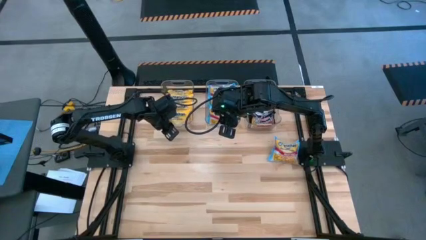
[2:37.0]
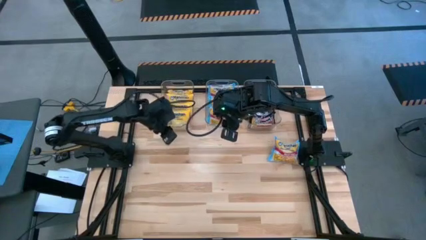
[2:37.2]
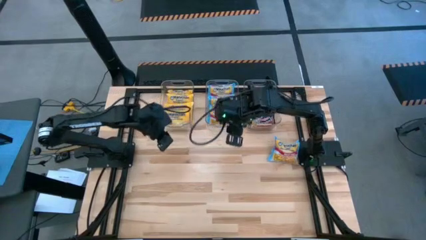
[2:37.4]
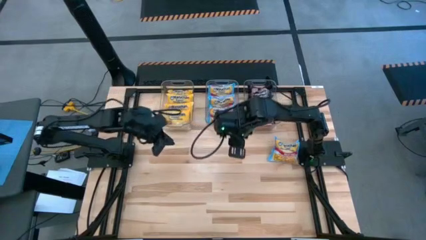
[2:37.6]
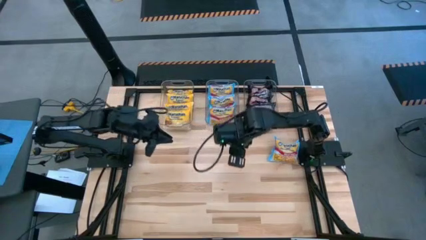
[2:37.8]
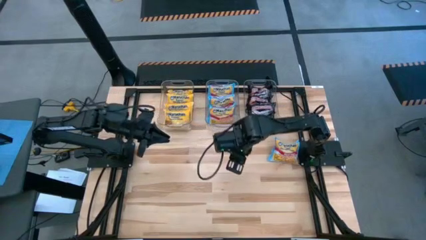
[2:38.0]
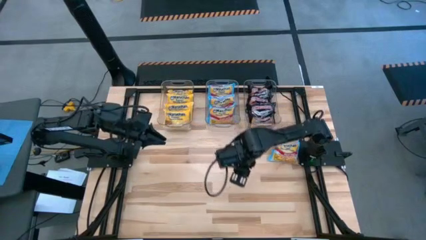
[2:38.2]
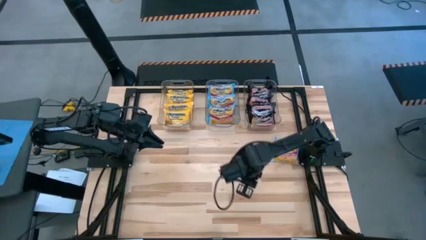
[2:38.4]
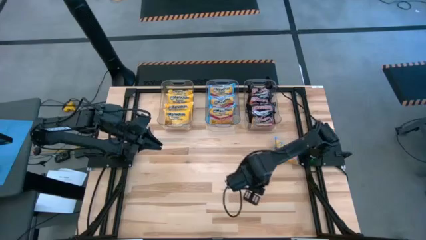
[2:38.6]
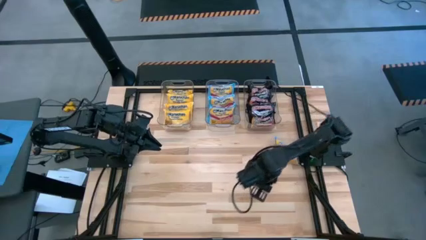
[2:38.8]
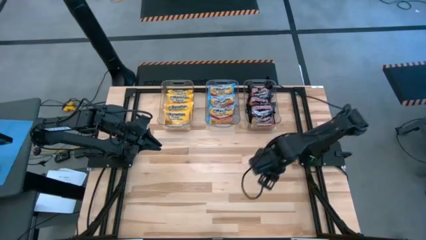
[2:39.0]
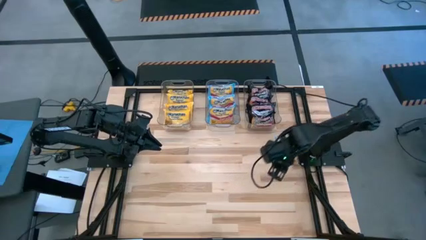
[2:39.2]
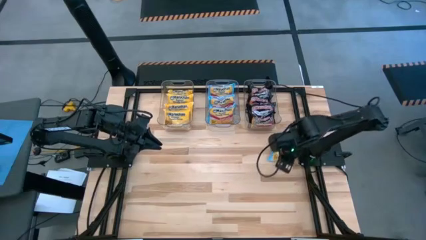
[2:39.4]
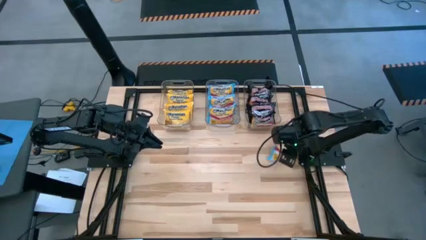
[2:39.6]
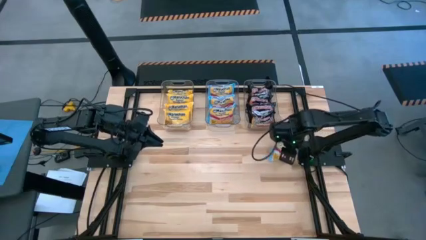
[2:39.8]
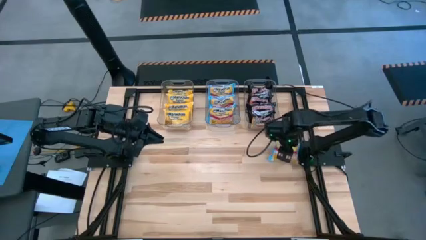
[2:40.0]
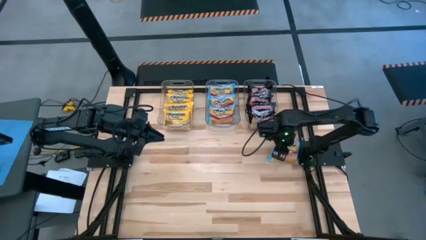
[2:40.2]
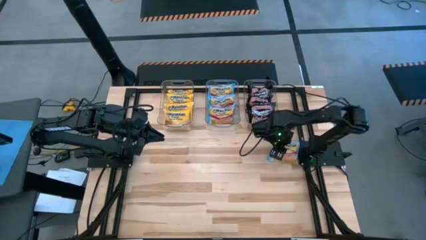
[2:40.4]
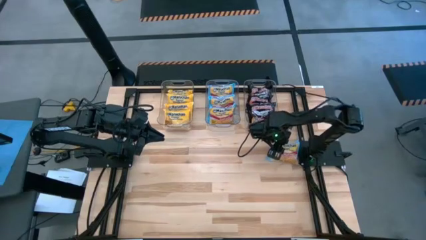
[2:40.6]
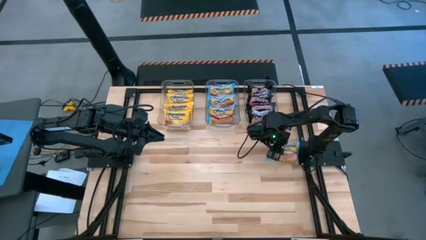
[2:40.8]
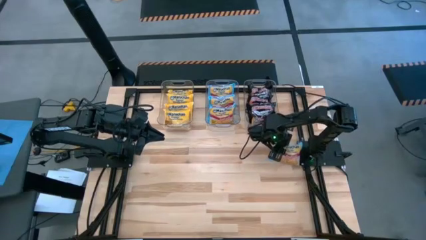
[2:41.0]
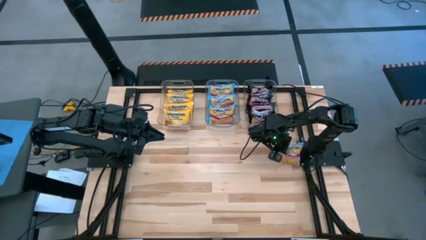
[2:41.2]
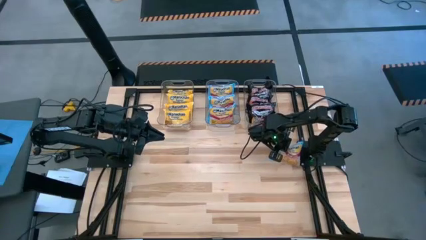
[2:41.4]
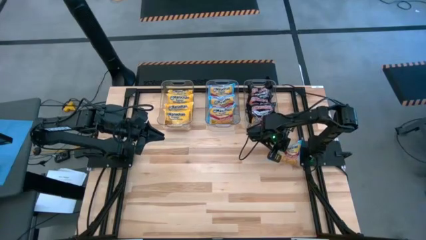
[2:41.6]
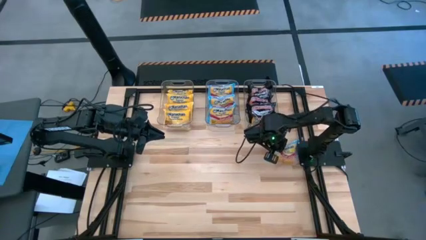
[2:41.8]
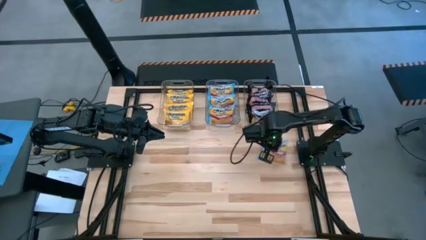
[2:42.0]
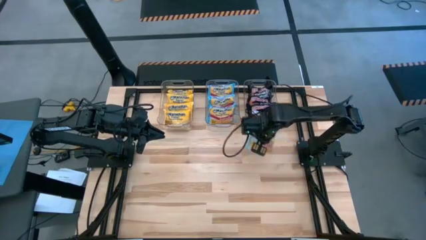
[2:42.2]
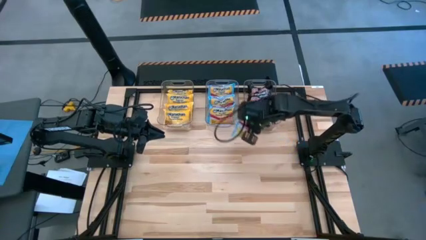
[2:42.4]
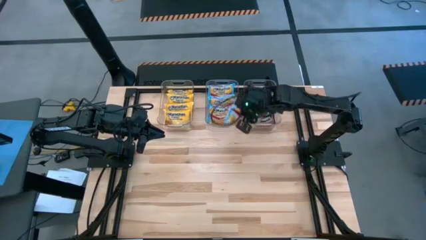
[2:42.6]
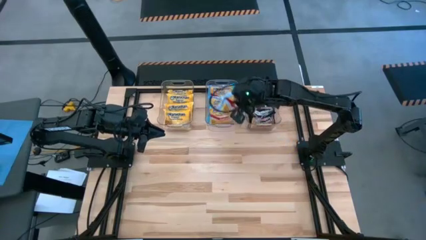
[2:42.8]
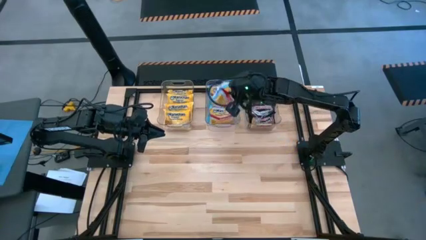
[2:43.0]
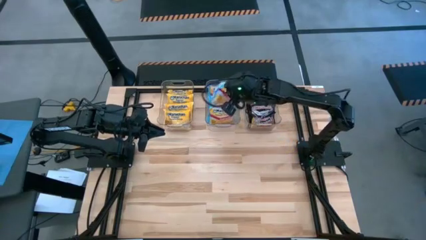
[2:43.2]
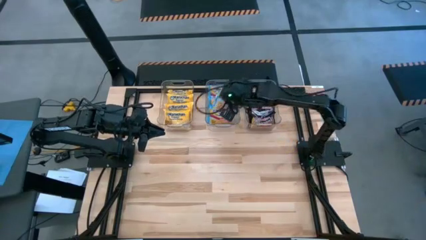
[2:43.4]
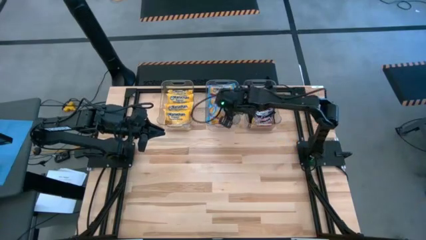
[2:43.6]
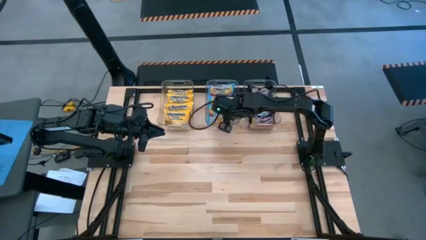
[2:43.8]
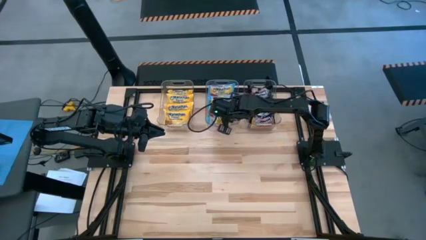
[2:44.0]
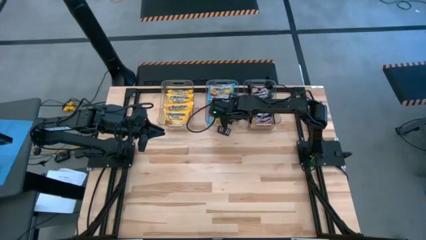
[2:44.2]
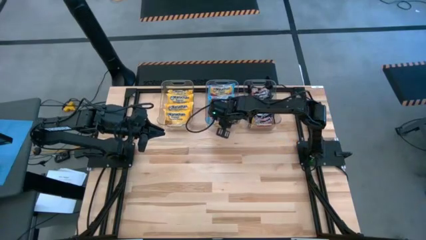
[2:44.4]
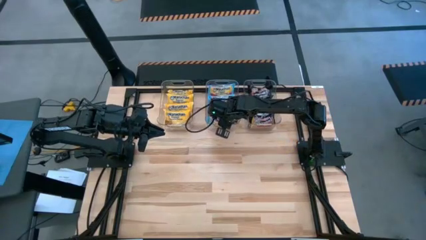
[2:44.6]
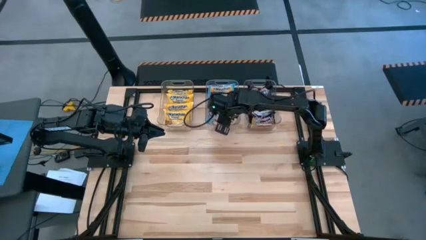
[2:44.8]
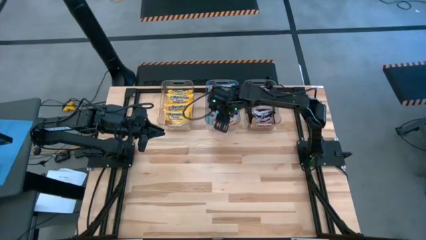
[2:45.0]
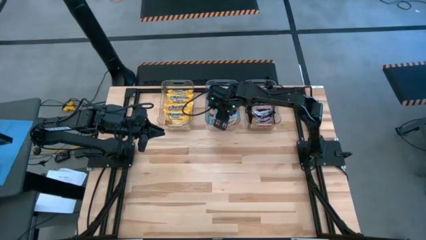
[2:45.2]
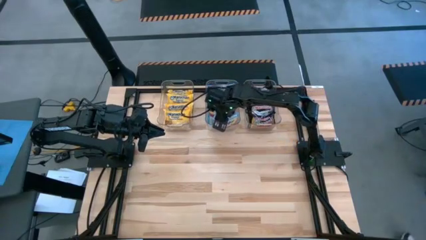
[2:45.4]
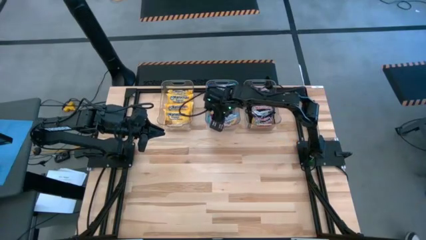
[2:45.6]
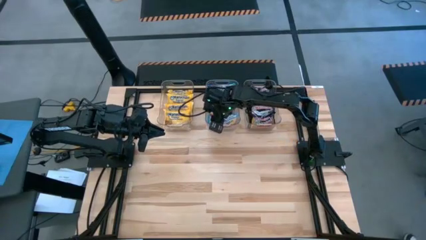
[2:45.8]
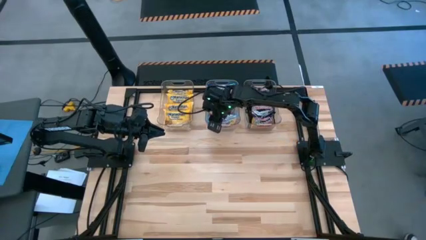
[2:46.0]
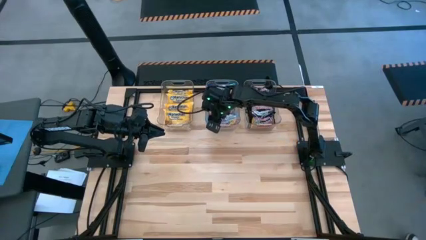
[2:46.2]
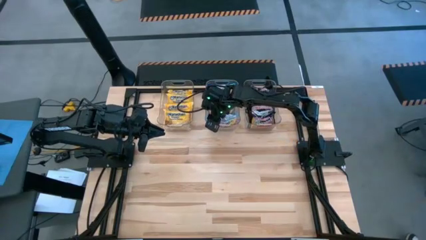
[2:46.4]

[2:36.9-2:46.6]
Task: Sort Maruchan noodles
Put the blue noodle pack into the center transparent bin

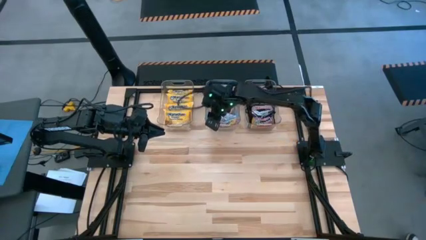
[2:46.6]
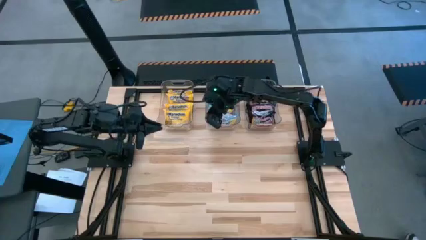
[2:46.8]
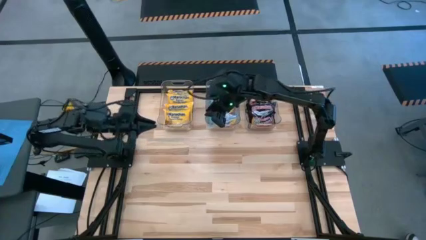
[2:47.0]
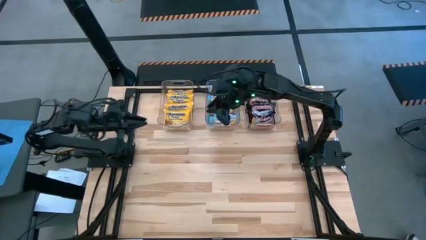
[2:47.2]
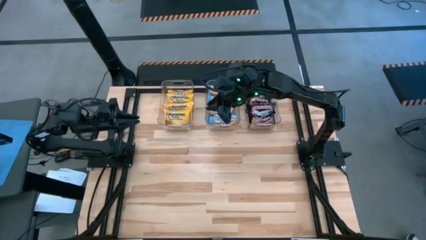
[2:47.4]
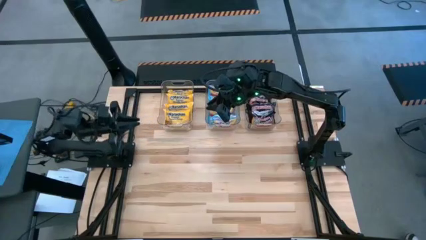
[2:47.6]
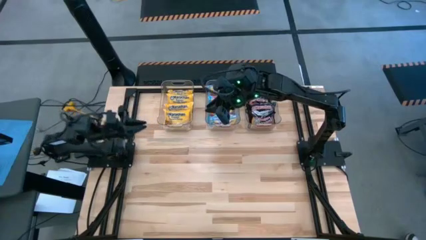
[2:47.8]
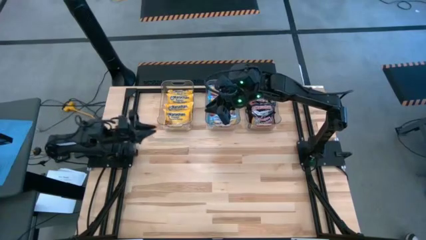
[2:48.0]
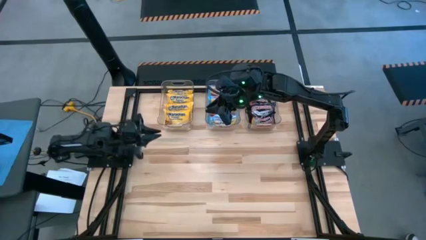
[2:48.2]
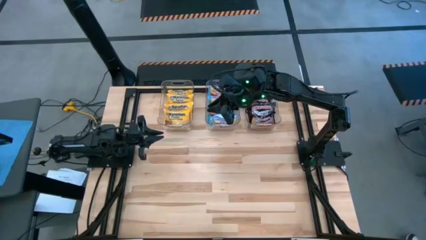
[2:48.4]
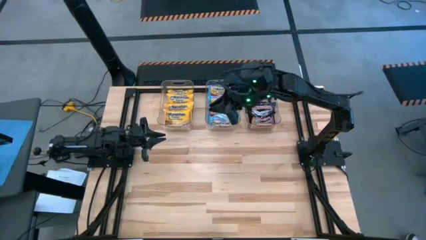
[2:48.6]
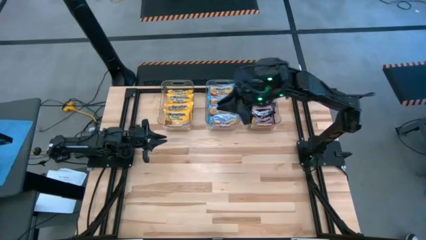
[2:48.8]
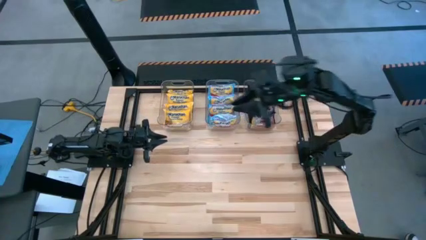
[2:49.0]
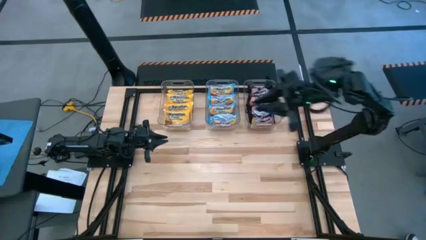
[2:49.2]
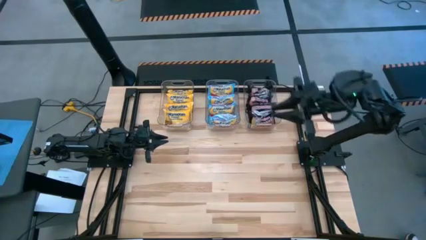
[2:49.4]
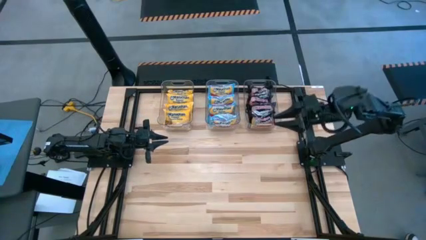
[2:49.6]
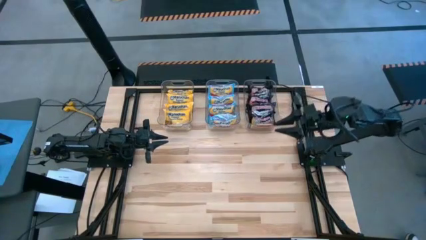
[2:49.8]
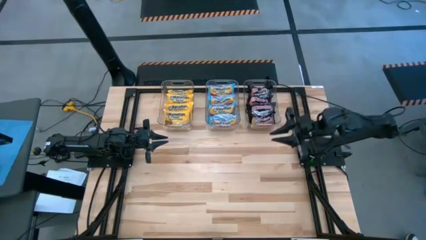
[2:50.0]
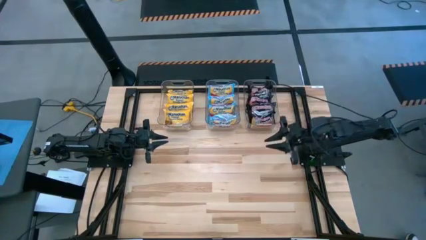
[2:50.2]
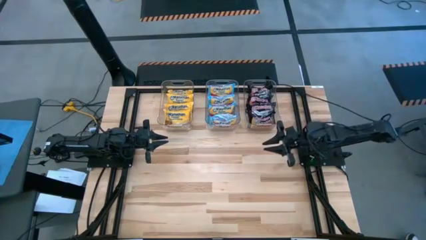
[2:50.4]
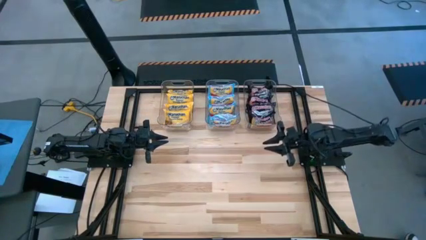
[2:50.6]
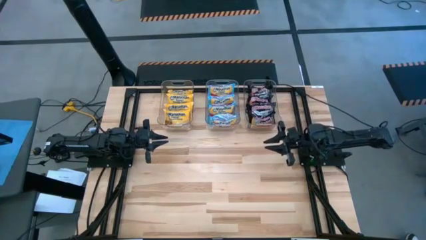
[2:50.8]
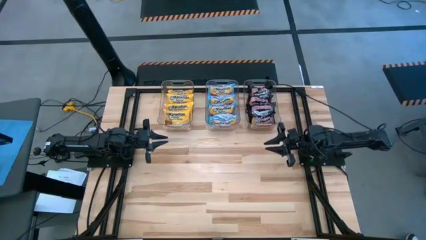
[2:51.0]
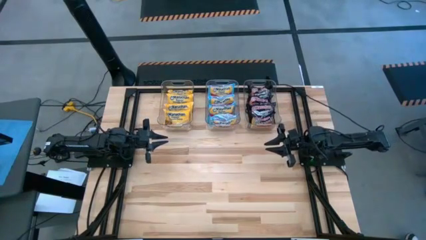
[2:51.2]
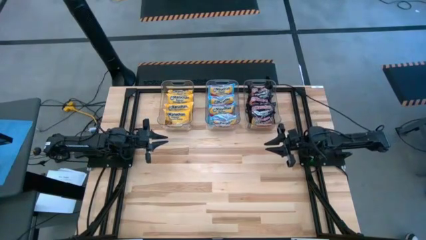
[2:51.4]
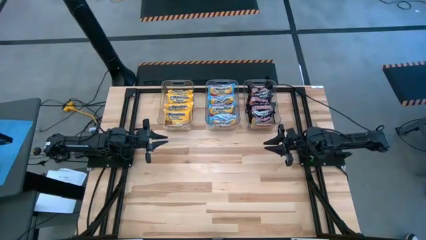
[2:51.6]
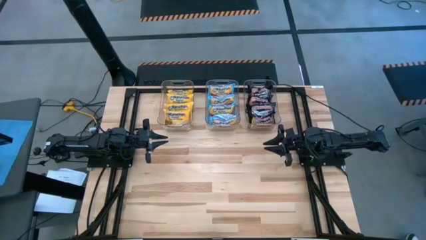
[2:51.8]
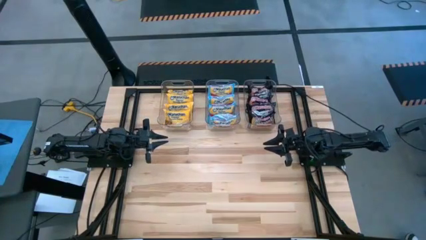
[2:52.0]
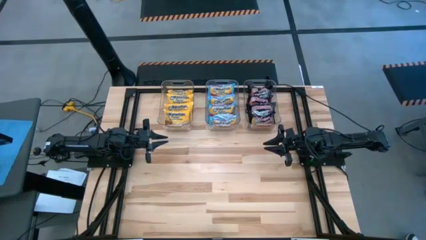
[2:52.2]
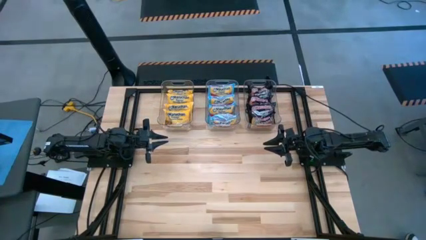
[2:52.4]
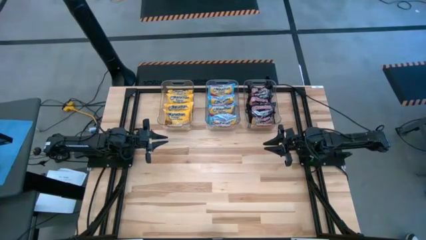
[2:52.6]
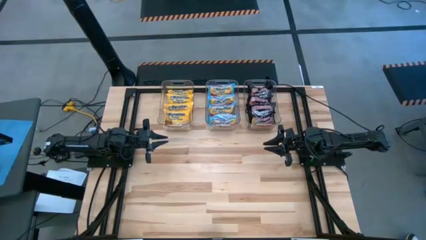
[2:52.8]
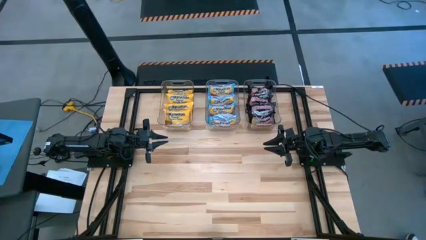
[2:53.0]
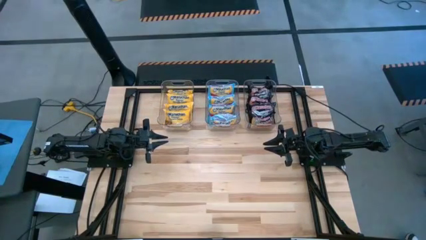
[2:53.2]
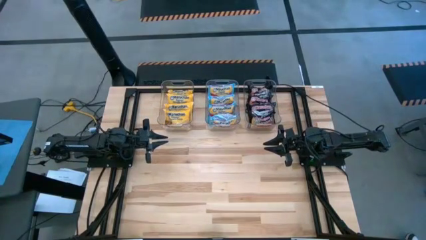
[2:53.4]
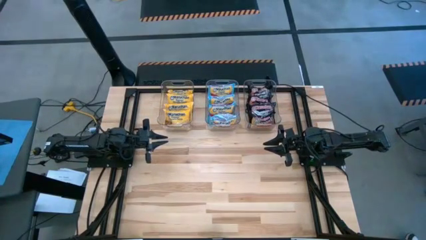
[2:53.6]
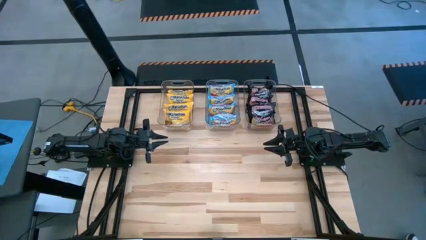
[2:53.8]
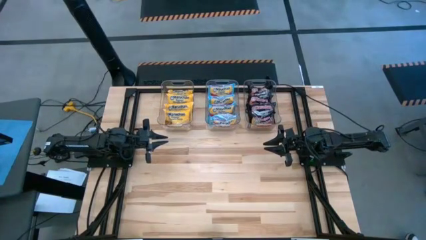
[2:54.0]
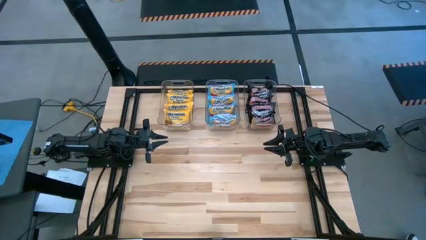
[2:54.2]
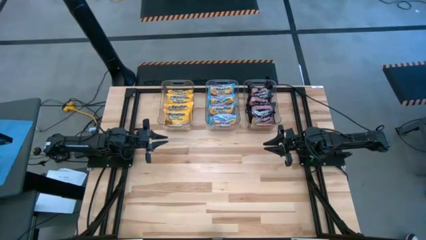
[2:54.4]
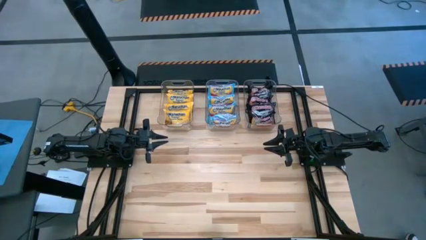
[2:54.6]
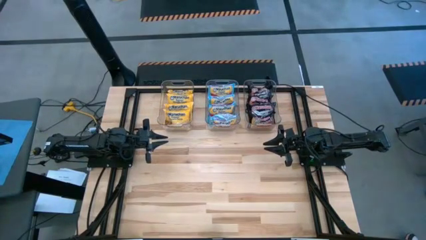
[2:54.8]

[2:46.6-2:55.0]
Return to Home Position
